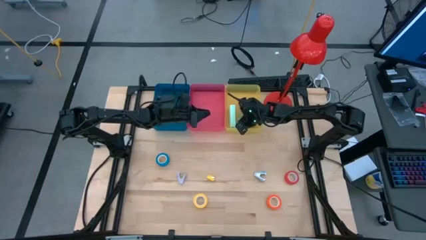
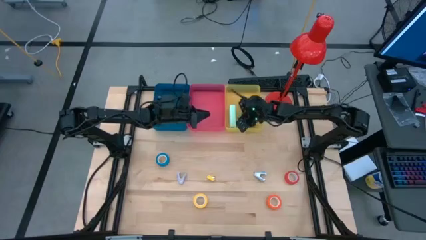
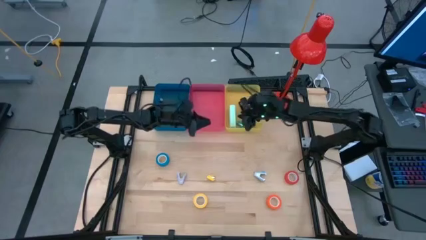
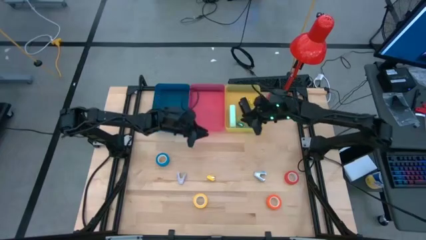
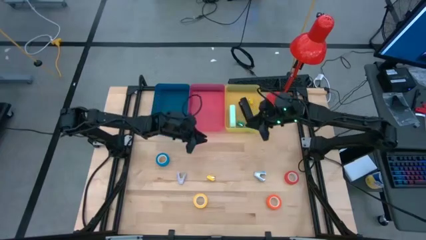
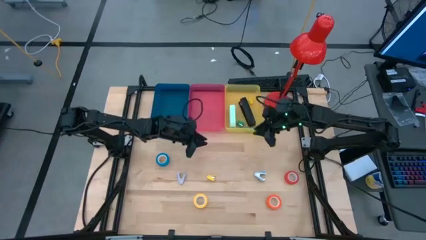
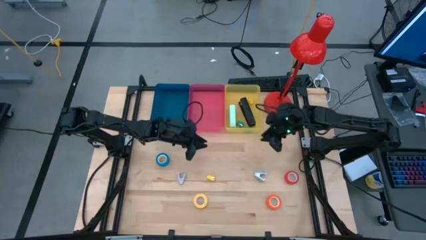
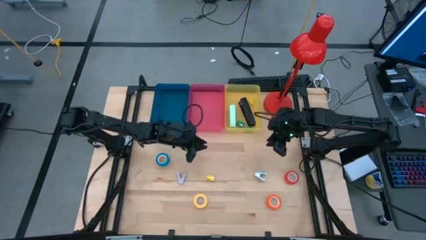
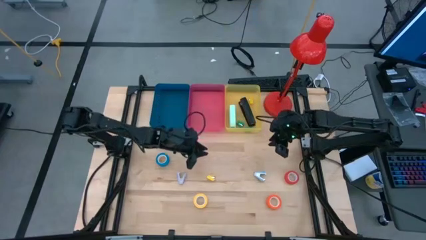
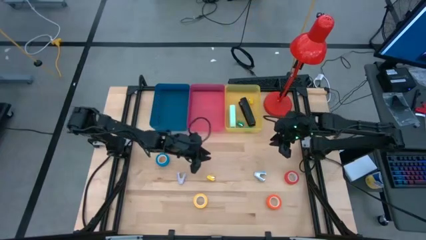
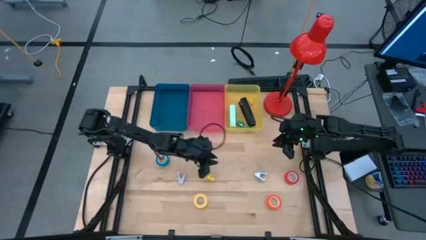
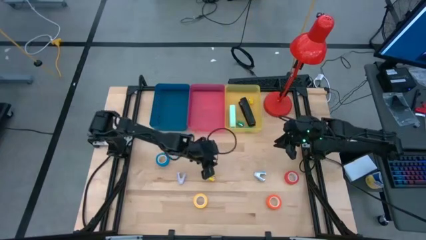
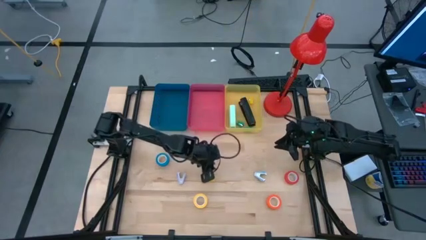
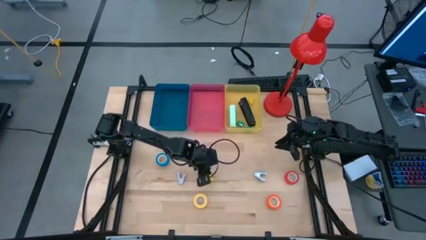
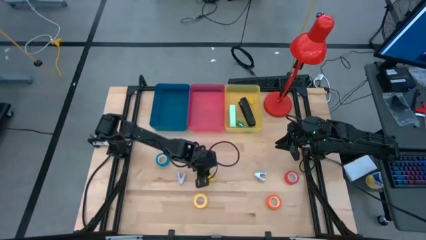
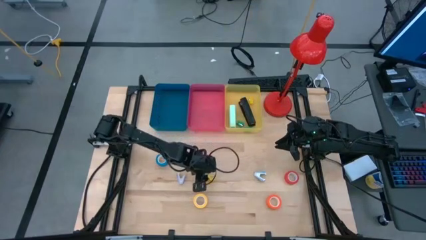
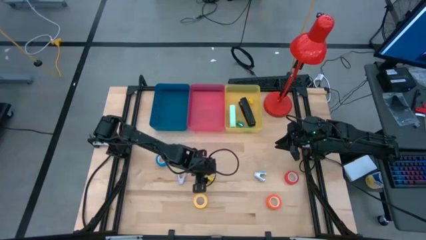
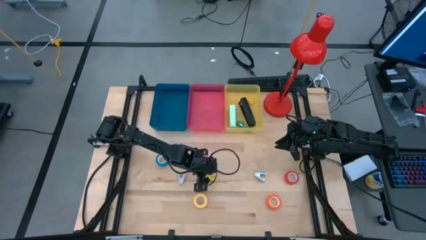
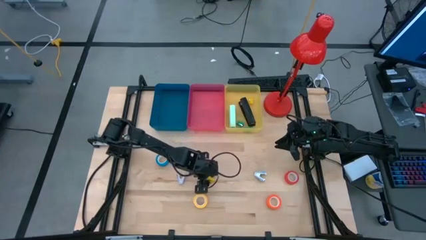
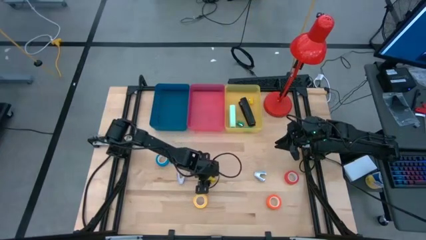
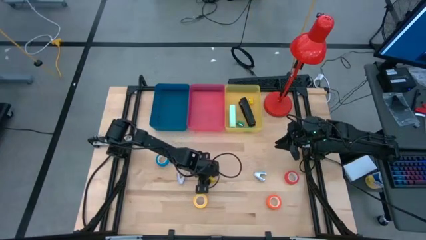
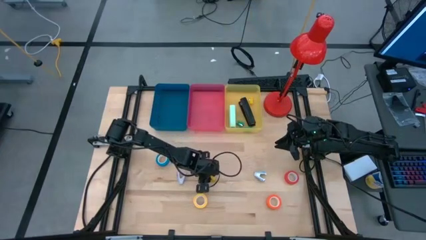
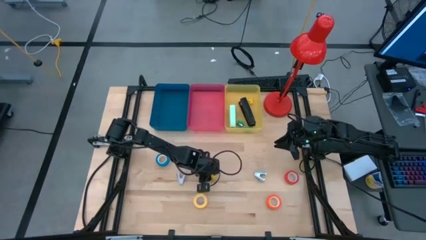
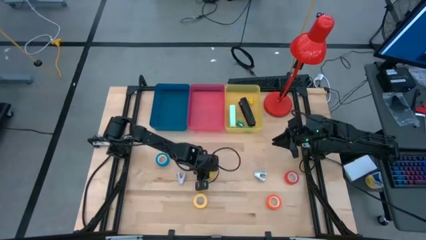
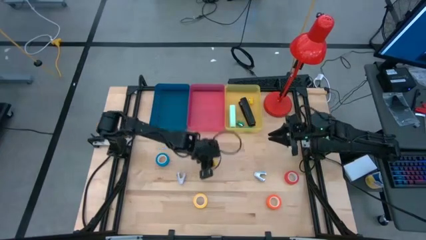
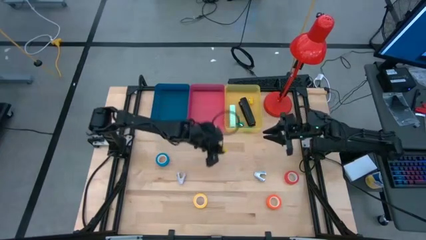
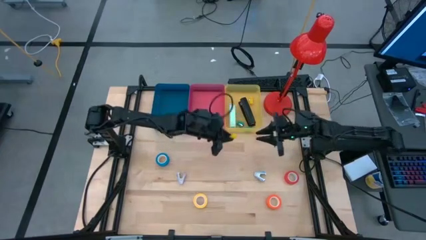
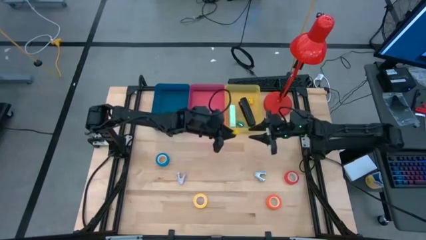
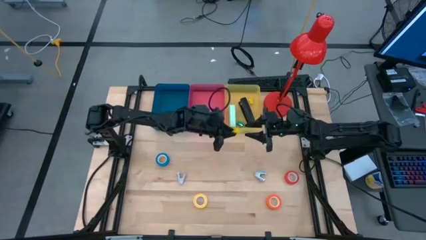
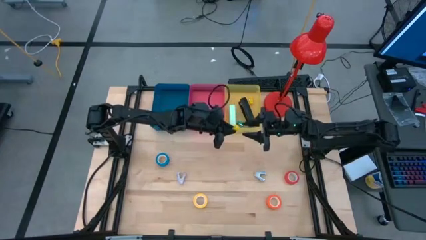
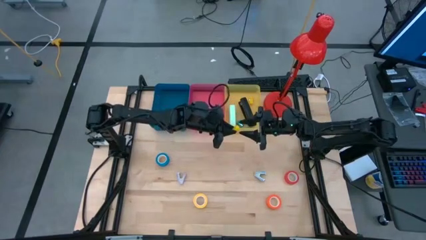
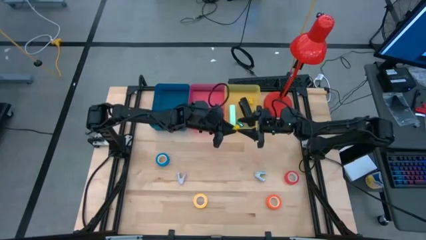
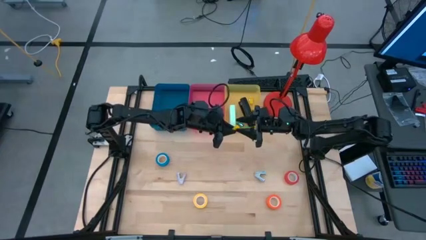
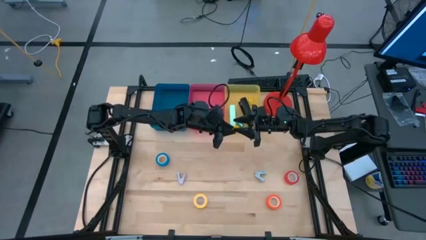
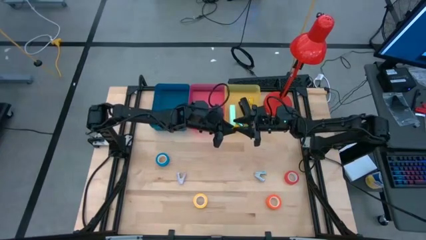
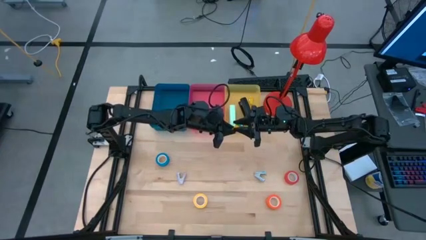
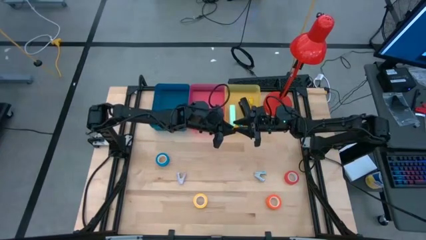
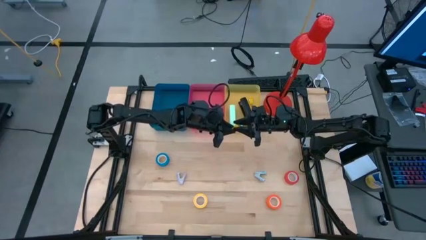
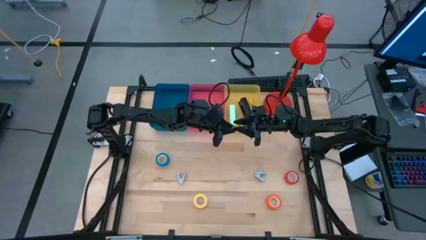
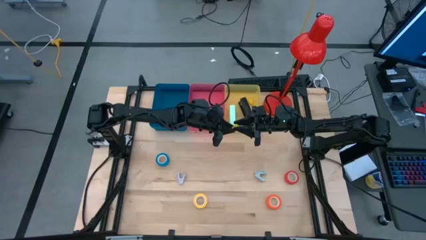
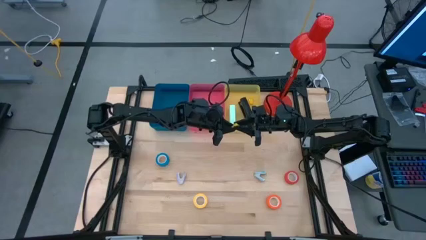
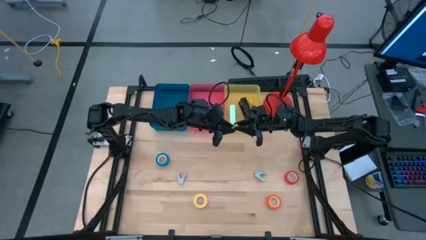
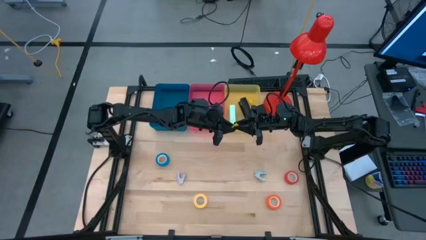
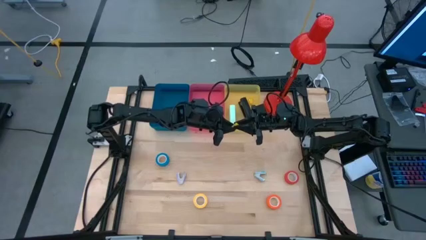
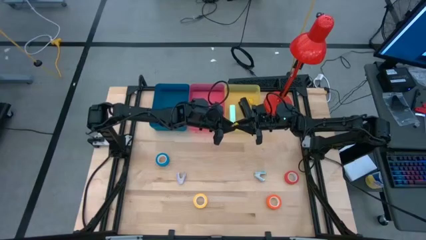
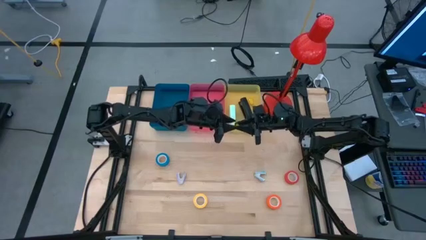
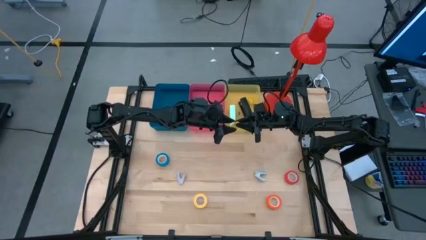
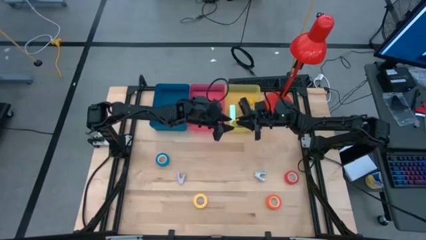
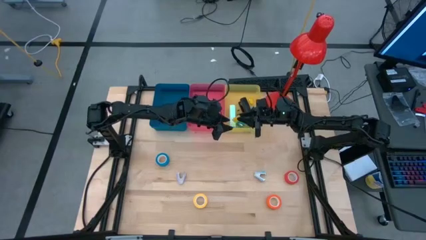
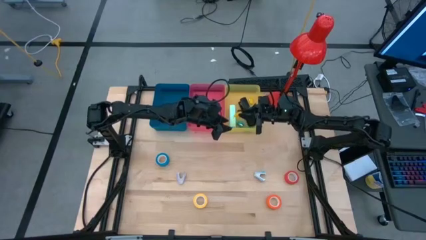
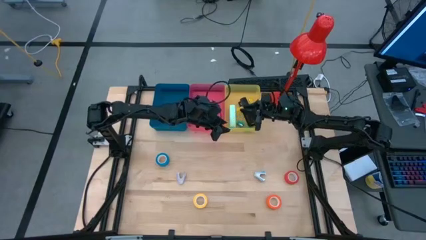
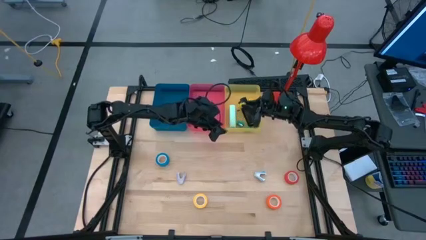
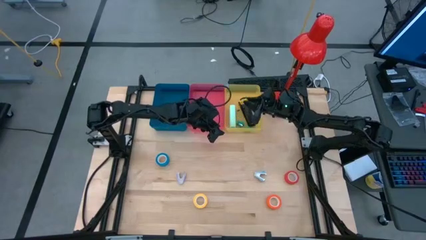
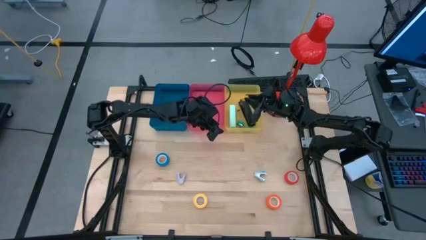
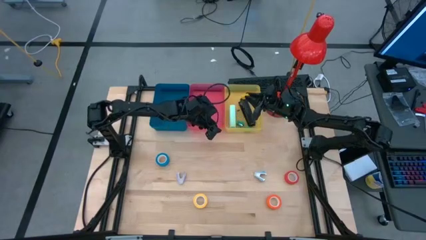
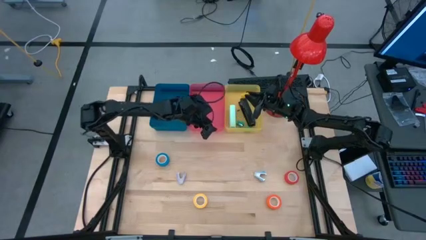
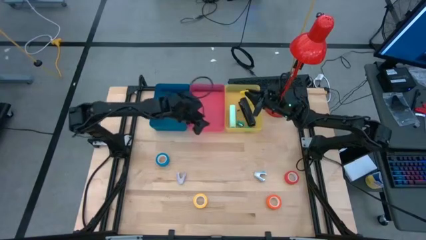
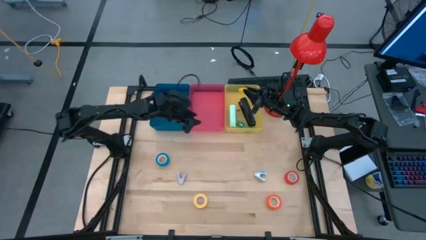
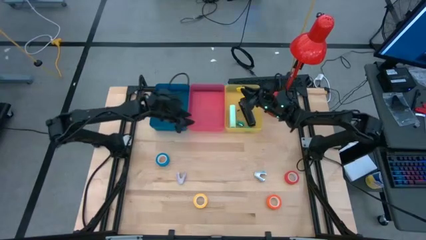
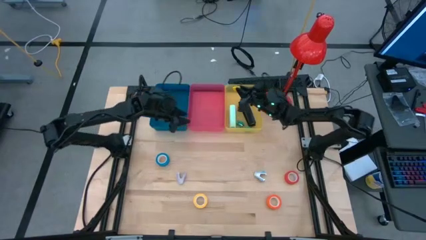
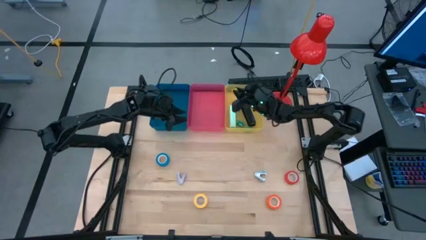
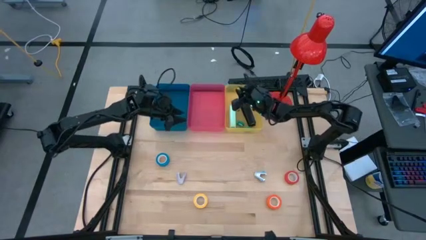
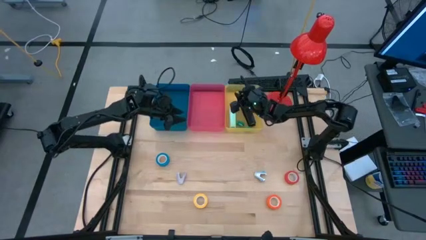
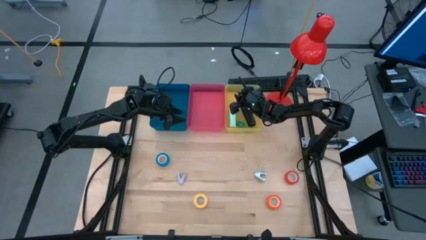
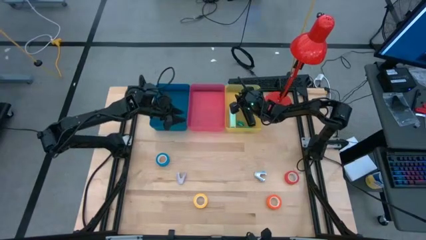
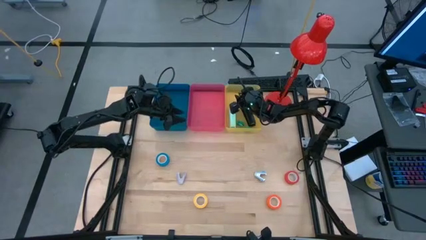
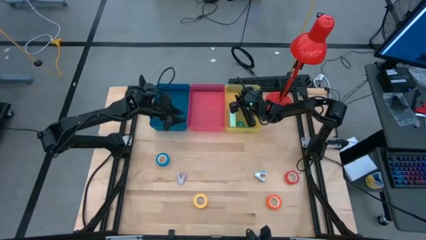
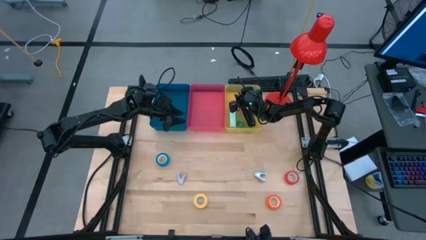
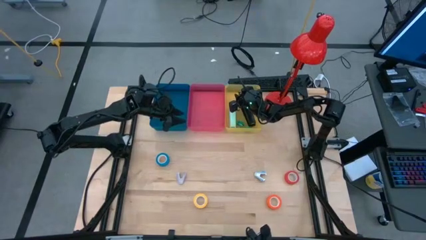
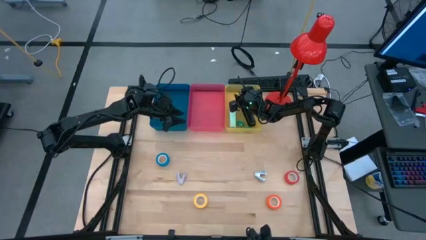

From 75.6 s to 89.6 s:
Task: Pick and place Stapler, Stapler remover, tape
Put the small yellow stapler into the yellow bin
